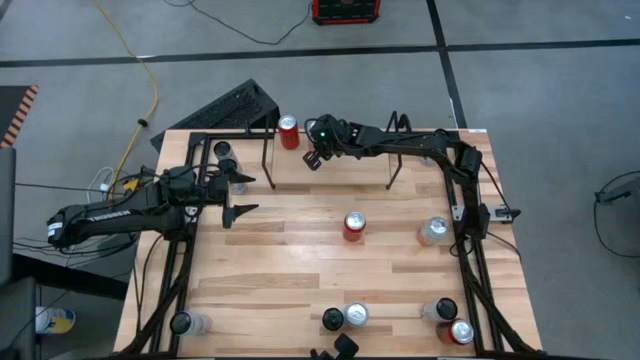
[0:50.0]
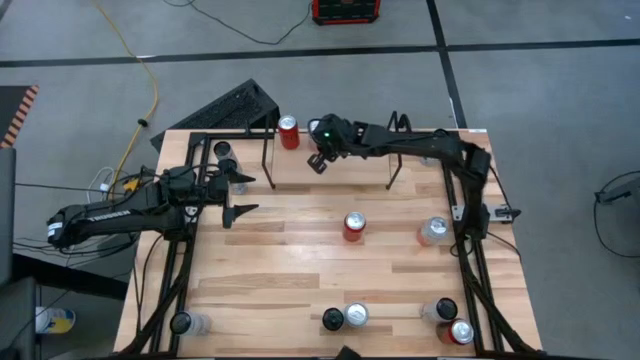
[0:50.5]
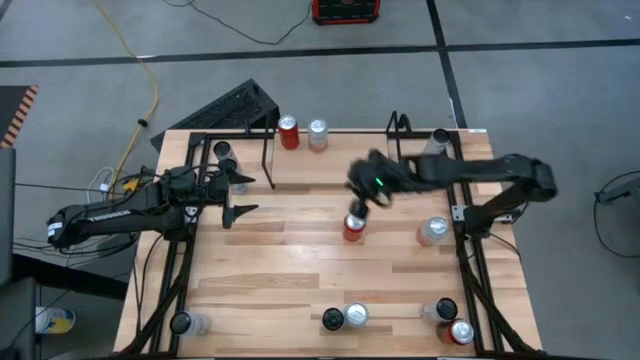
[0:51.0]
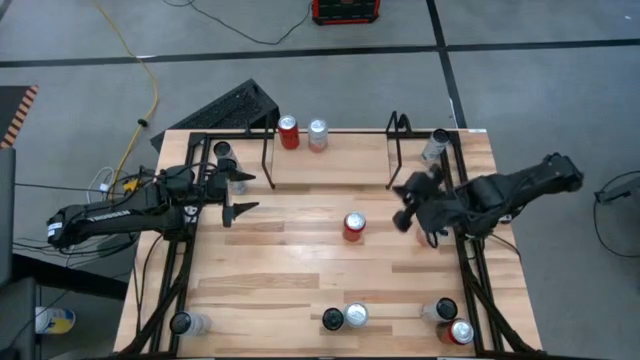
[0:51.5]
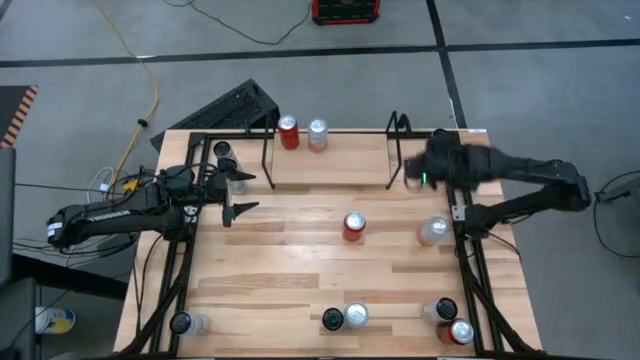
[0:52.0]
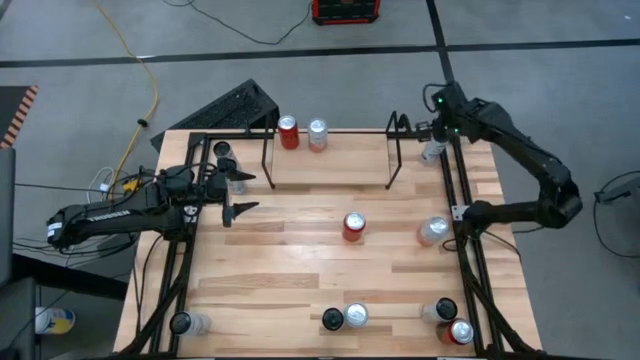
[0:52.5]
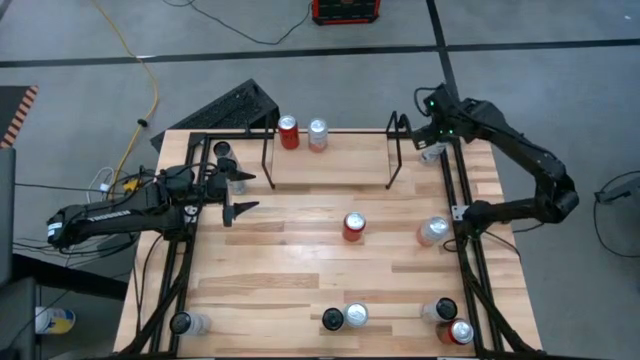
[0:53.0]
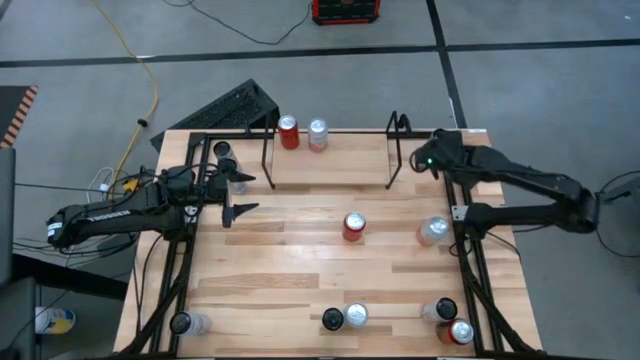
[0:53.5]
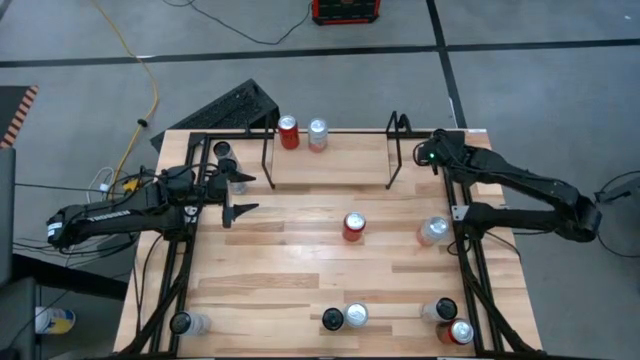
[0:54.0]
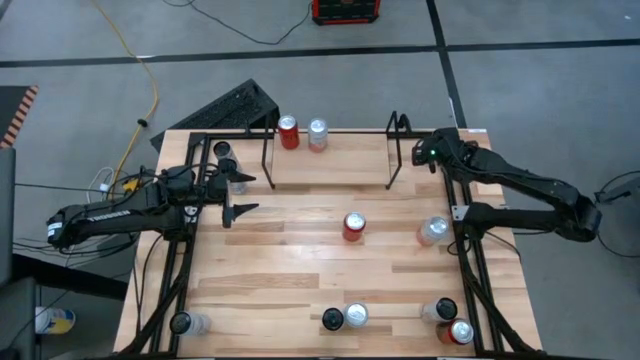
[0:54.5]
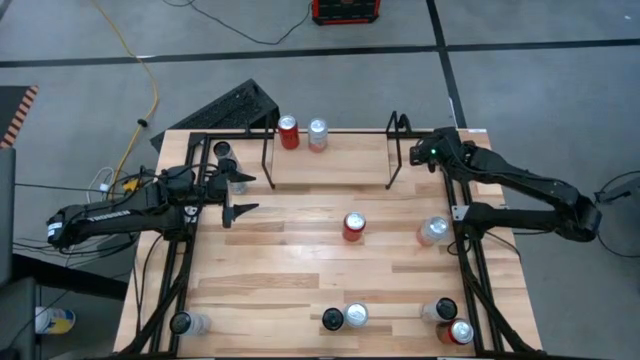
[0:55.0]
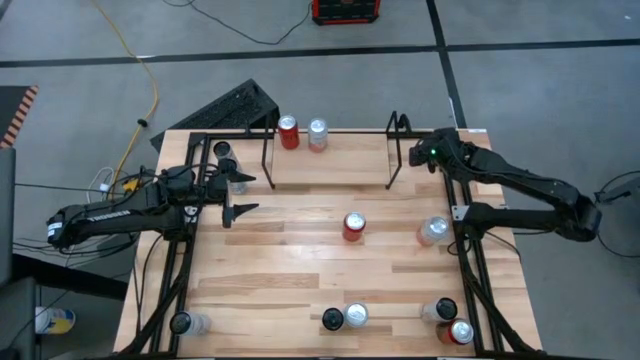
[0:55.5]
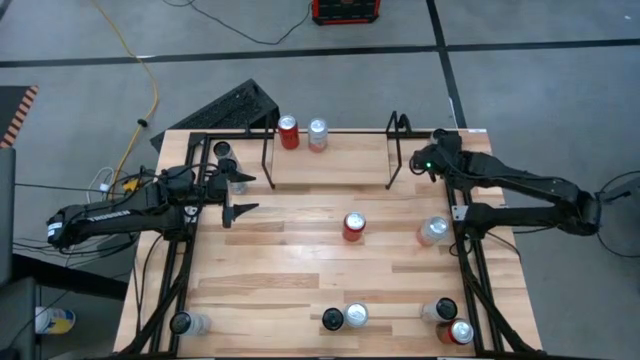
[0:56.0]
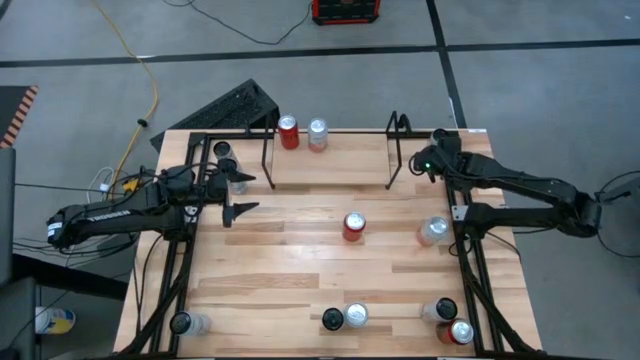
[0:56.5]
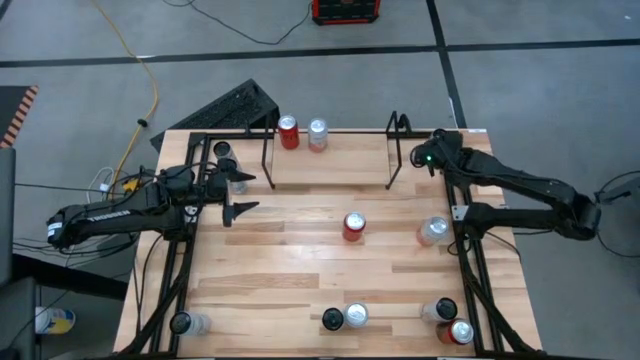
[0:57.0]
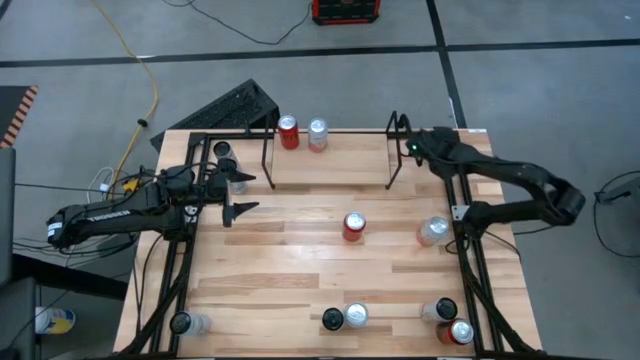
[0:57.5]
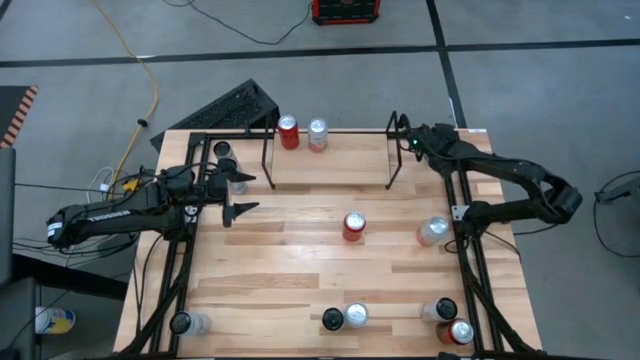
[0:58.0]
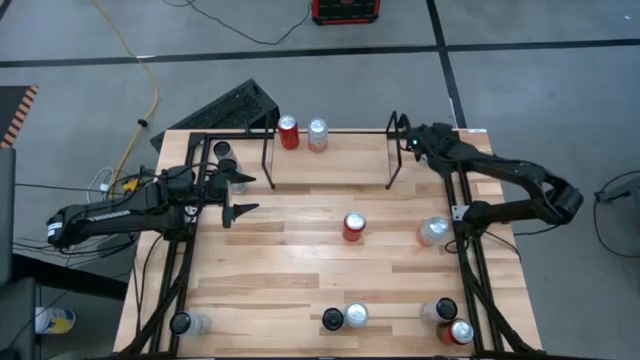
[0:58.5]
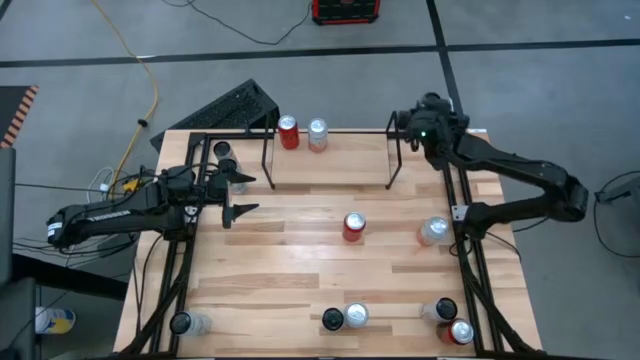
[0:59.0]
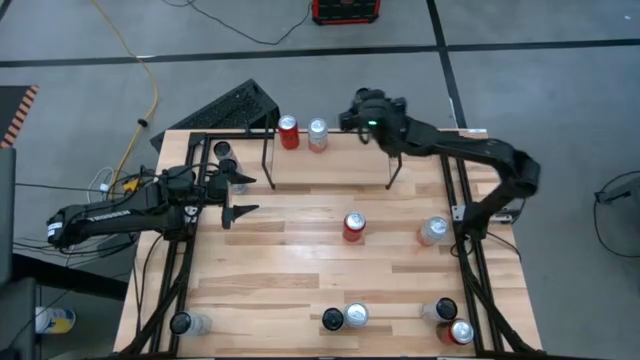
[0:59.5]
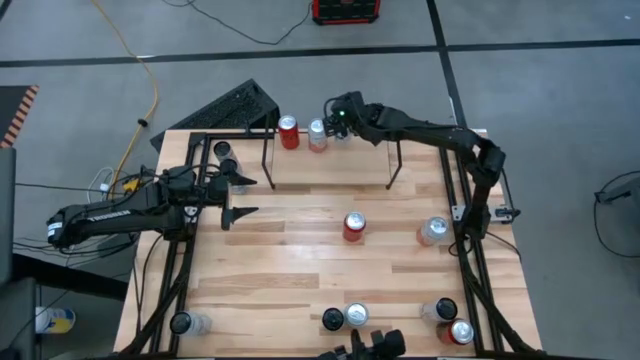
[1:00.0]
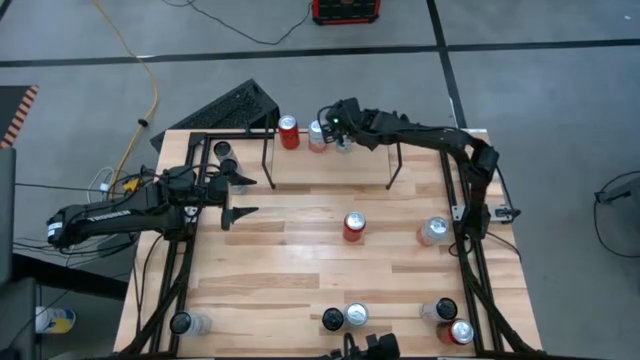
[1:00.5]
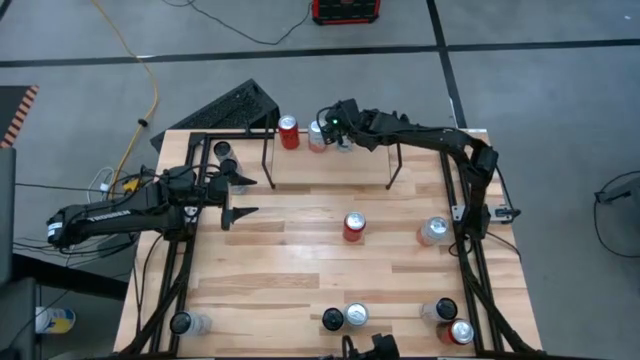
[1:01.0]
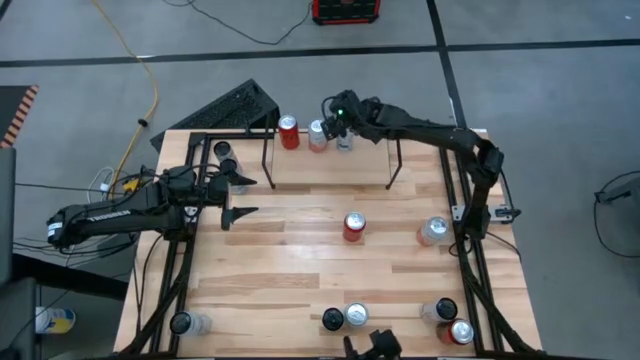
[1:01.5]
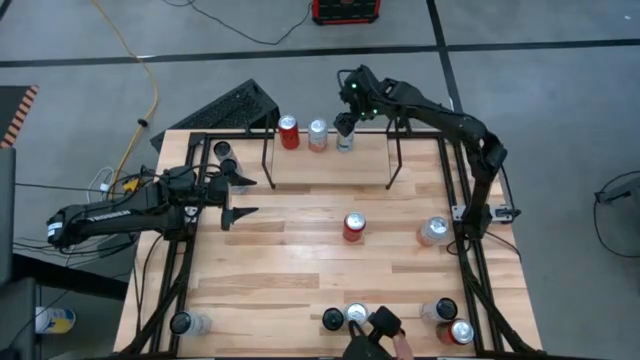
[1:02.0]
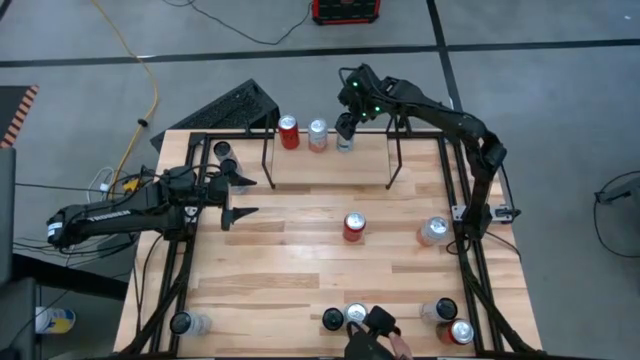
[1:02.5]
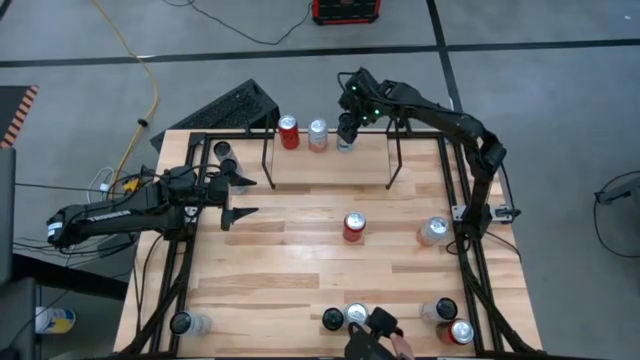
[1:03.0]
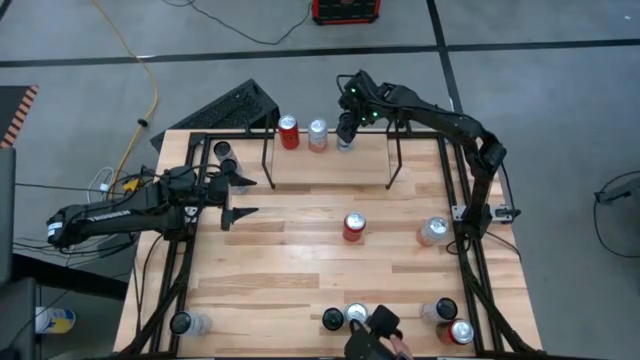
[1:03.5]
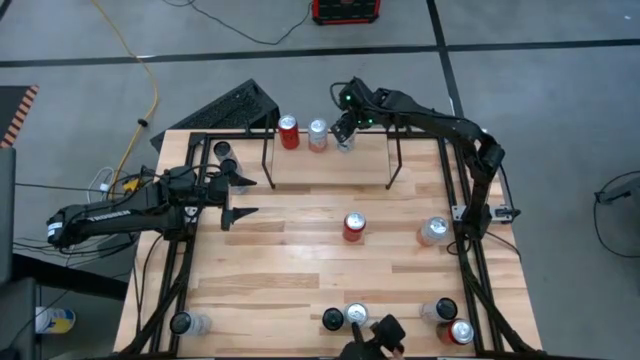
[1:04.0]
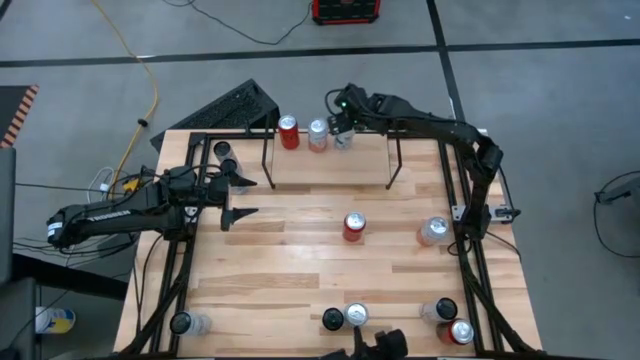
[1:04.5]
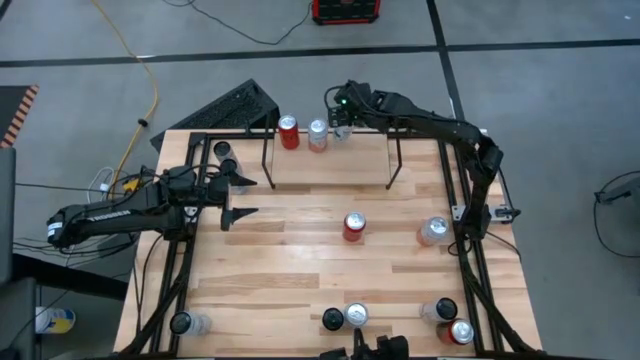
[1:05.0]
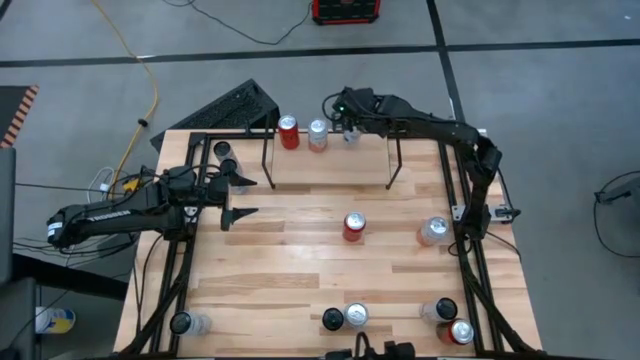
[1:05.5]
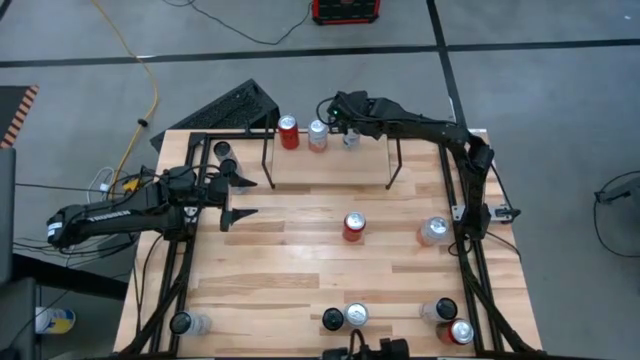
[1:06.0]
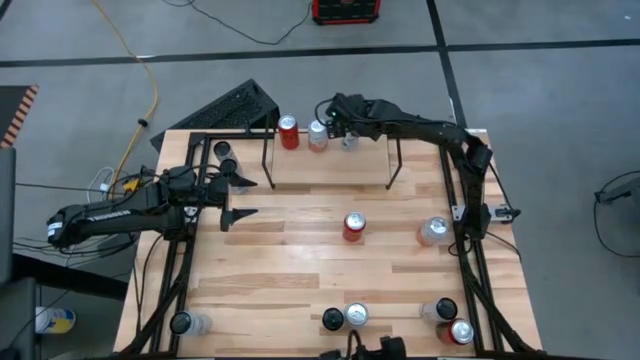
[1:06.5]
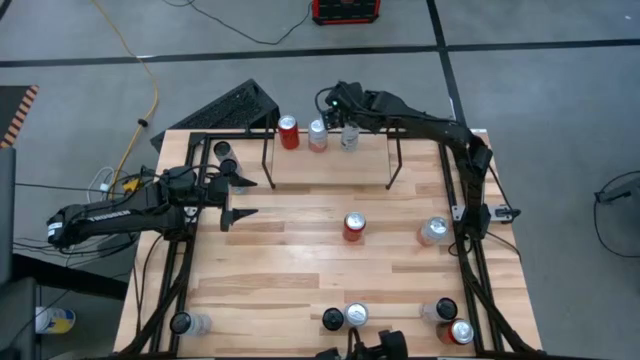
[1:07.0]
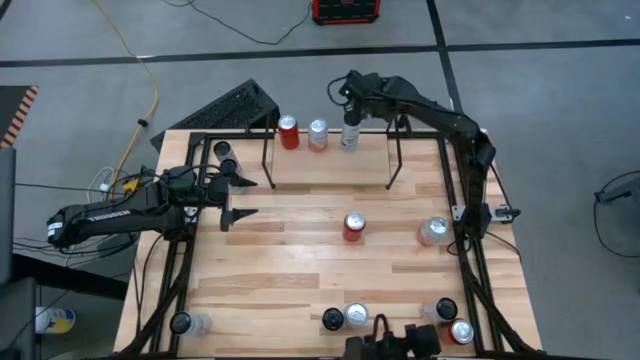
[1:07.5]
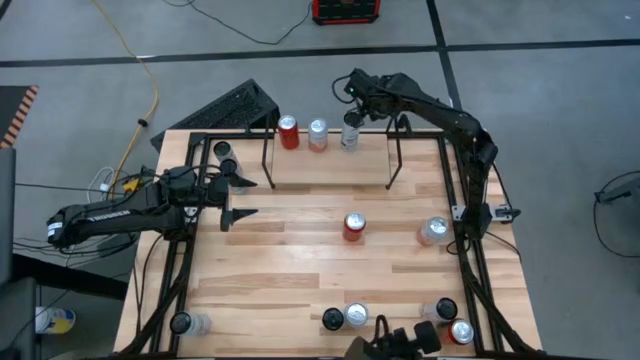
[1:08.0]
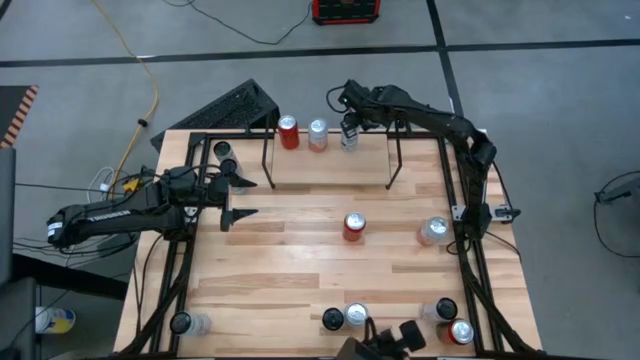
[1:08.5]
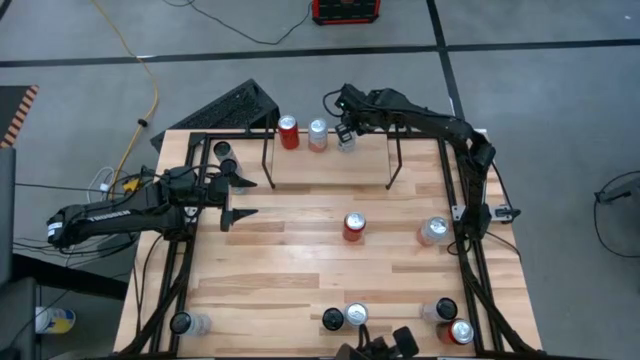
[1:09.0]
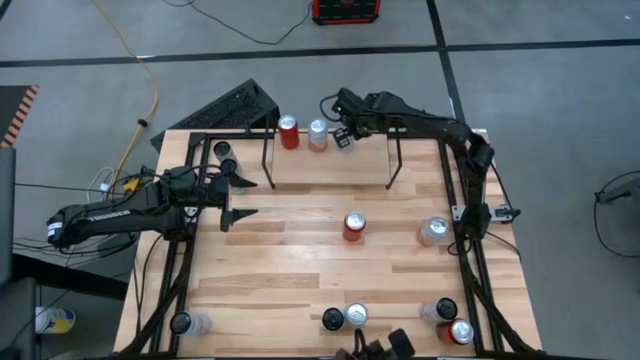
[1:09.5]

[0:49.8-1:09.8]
Task: Place canned beverage on shelf
Put the top right white blue soda can on the shelf

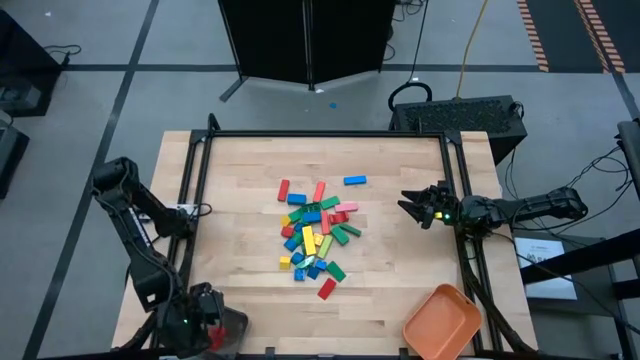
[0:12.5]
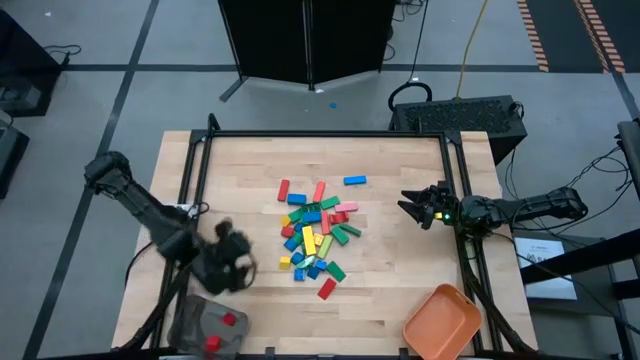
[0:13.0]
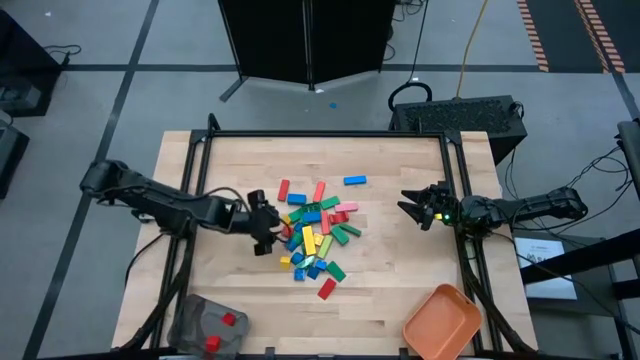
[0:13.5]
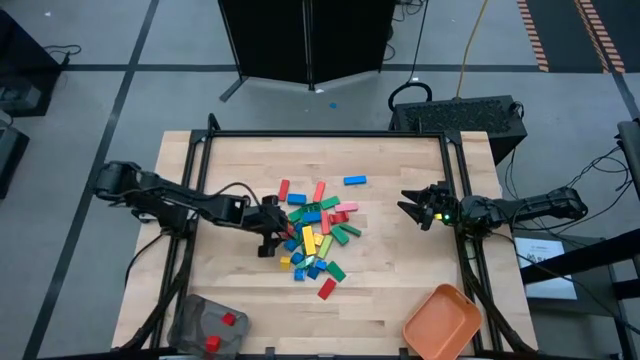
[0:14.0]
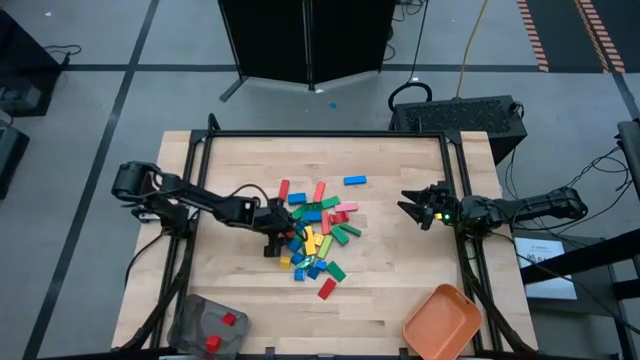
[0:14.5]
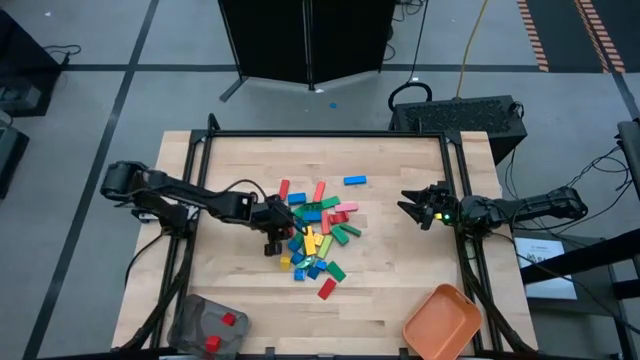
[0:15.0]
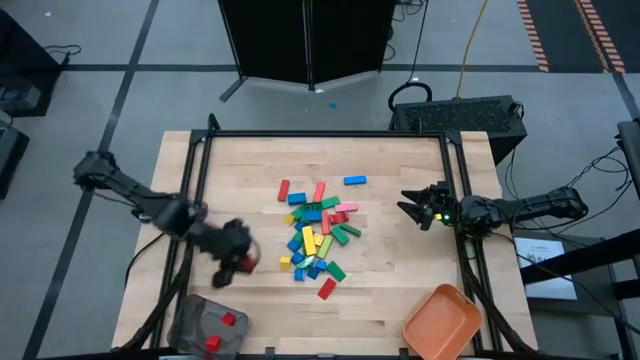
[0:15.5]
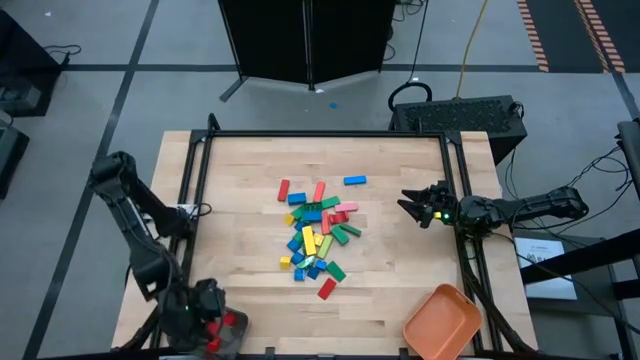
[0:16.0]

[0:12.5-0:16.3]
Task: Sort blocks by size
Put the red triangular block into the black bin
